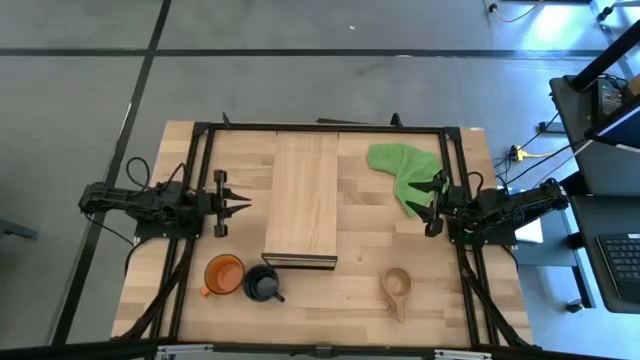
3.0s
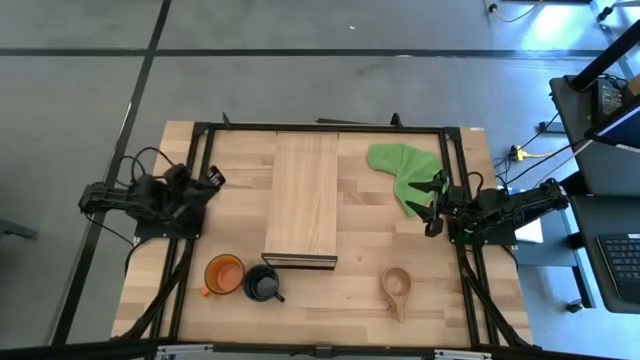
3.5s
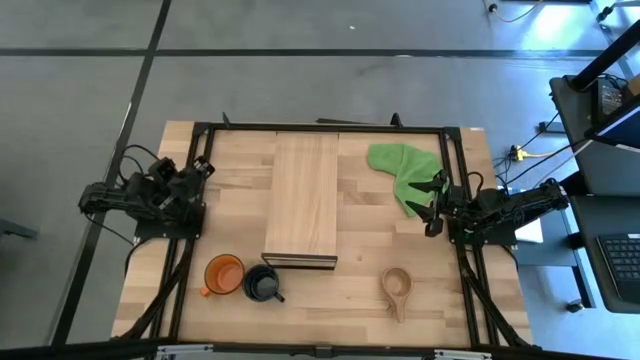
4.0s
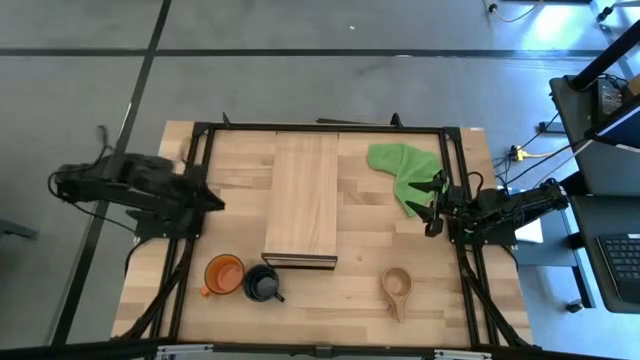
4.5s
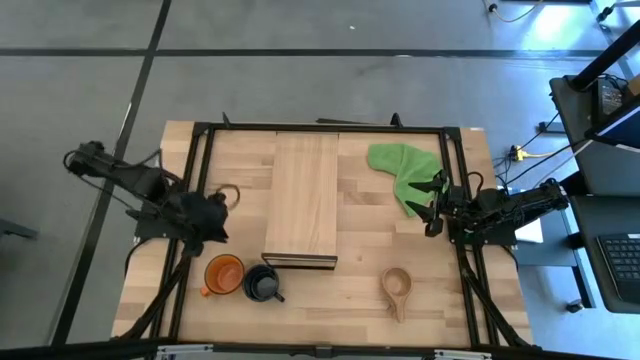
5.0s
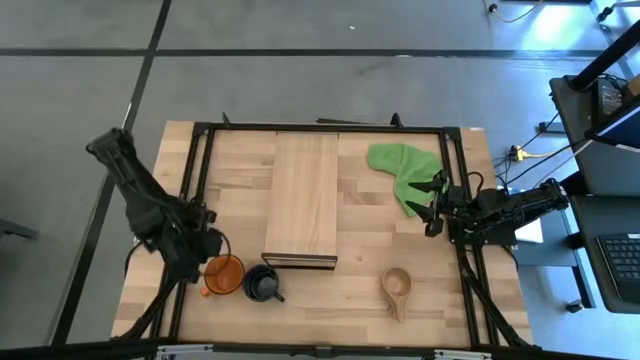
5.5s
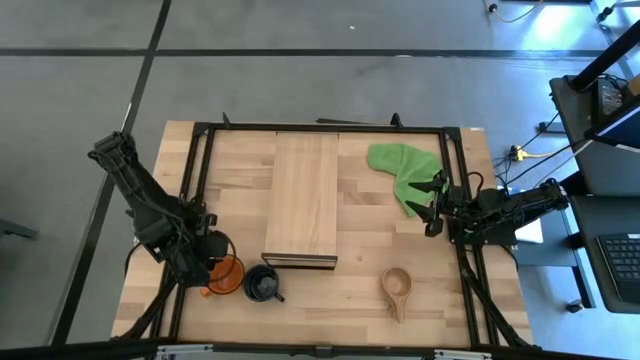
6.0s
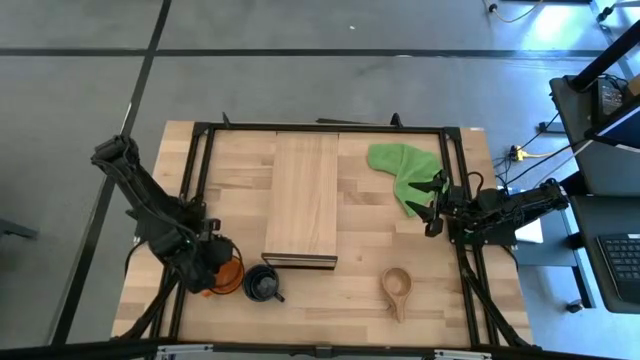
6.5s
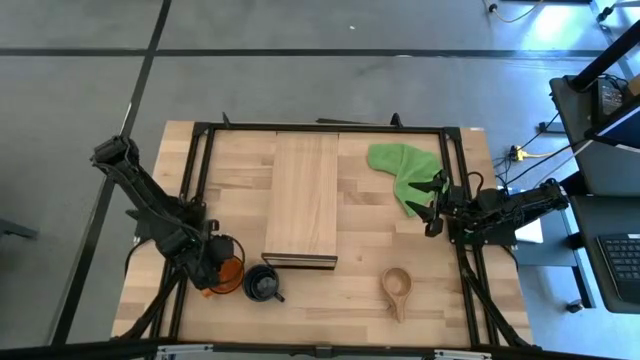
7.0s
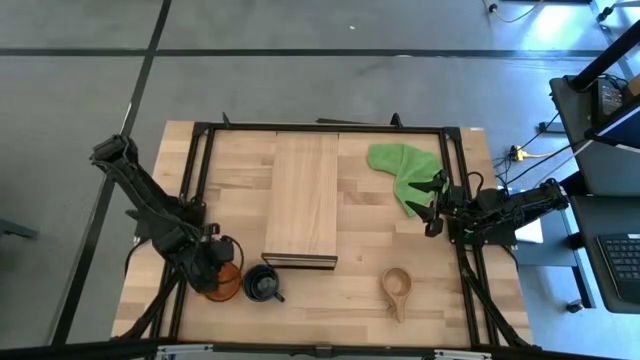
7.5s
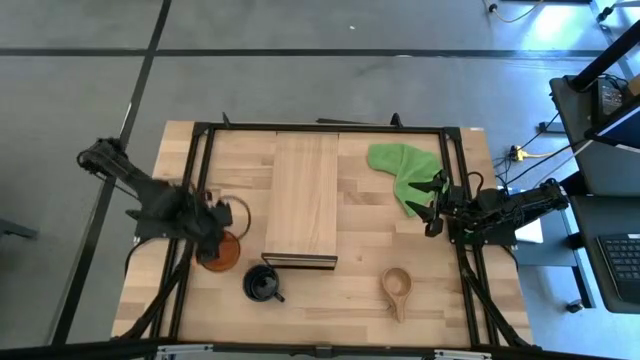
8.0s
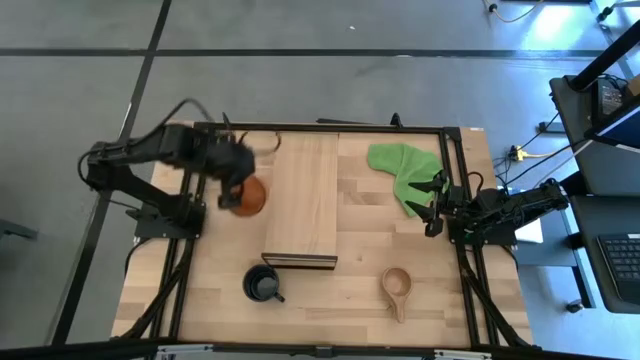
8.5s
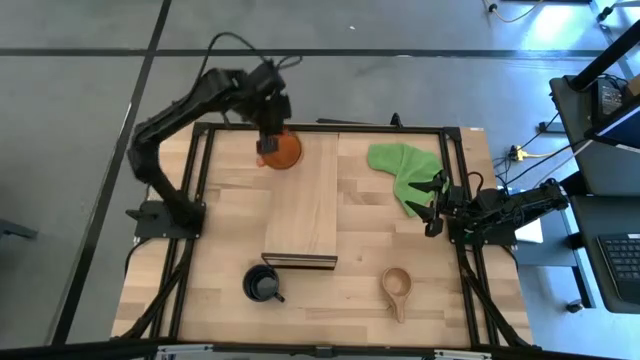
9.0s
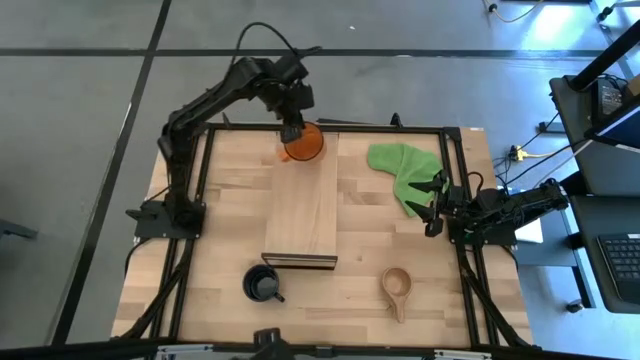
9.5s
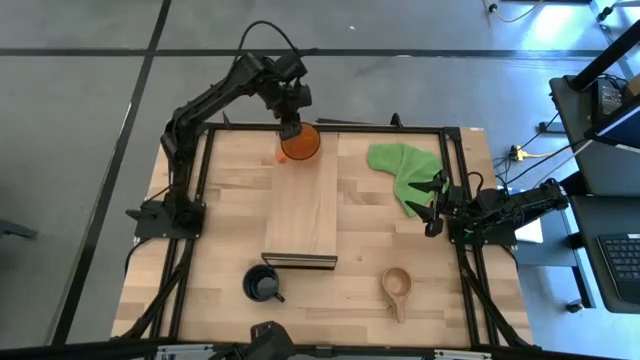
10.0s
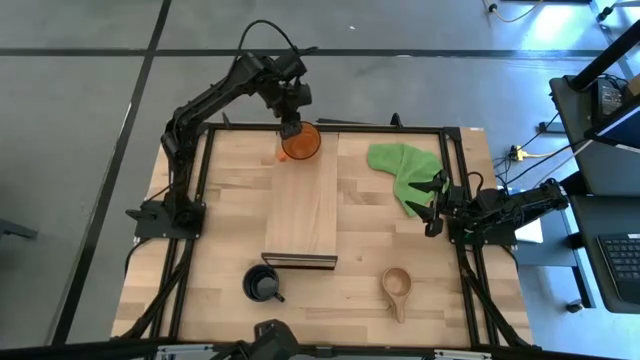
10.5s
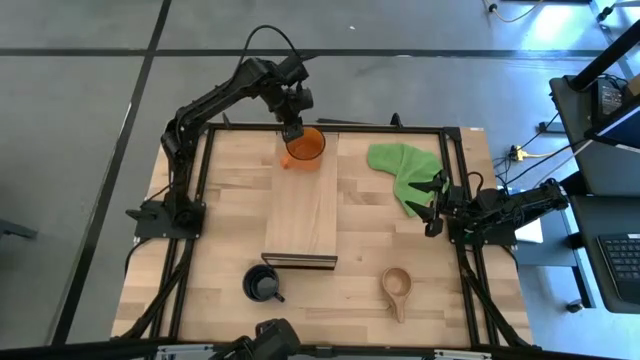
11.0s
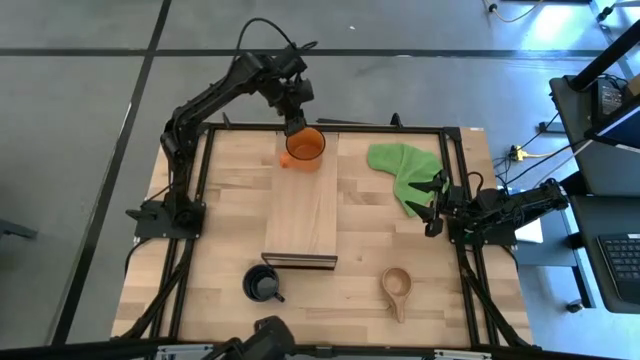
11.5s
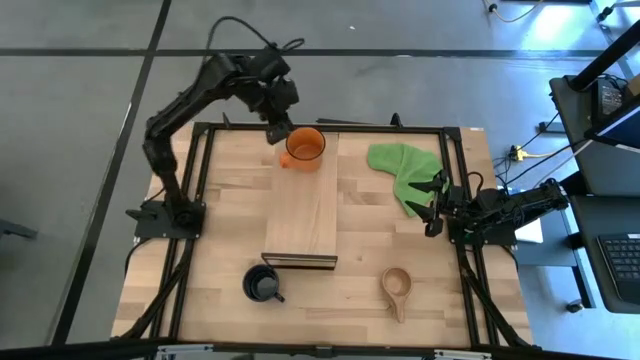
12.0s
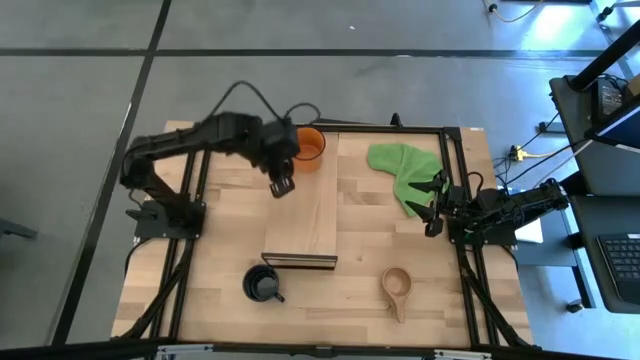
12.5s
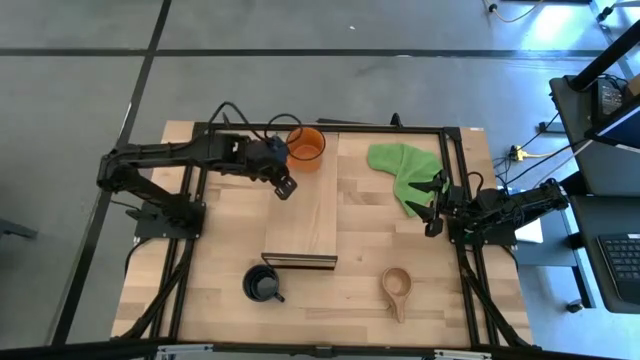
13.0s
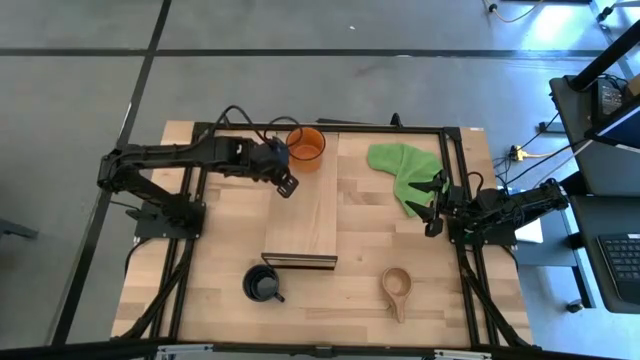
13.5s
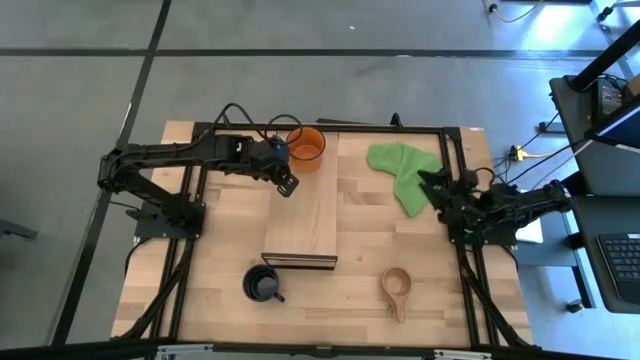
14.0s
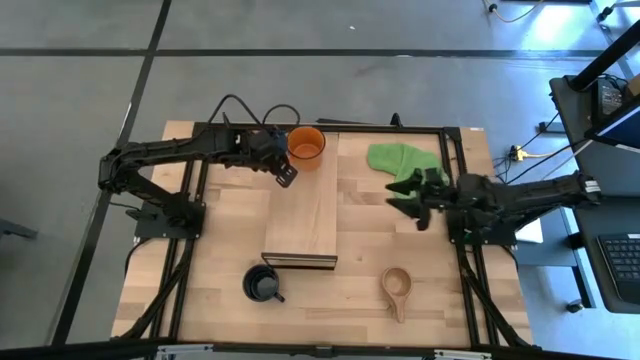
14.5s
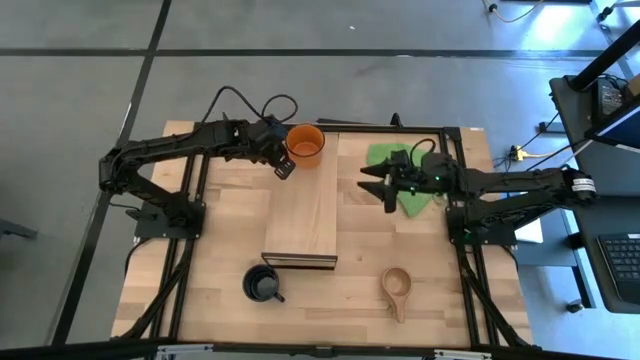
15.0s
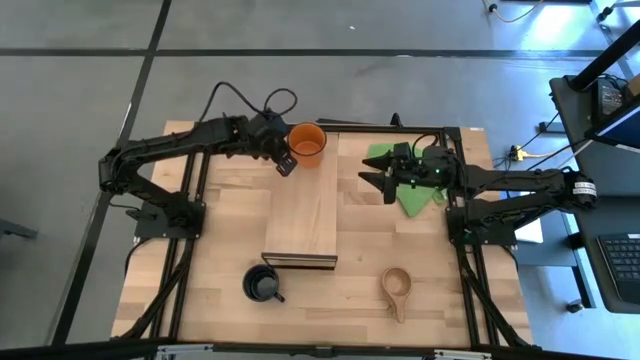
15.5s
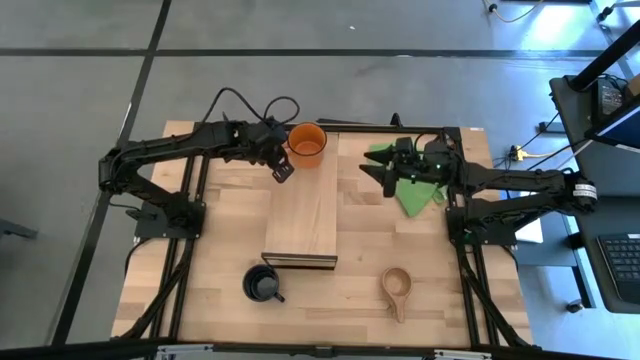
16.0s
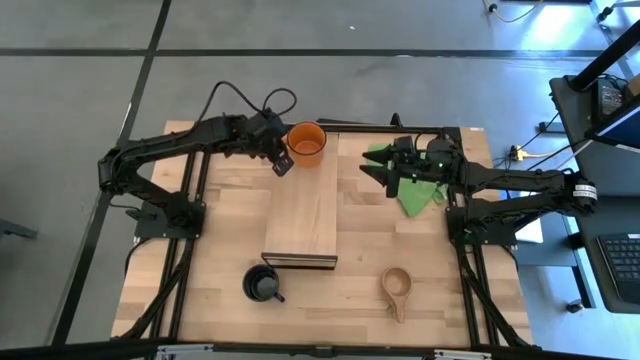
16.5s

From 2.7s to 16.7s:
Task: Stack small to large cups/mugs on shelf
Put the orange mug on the shelf

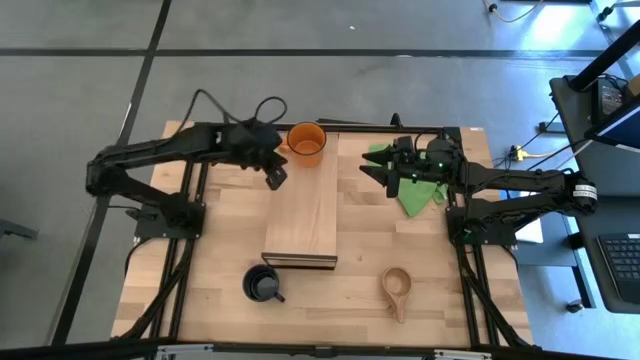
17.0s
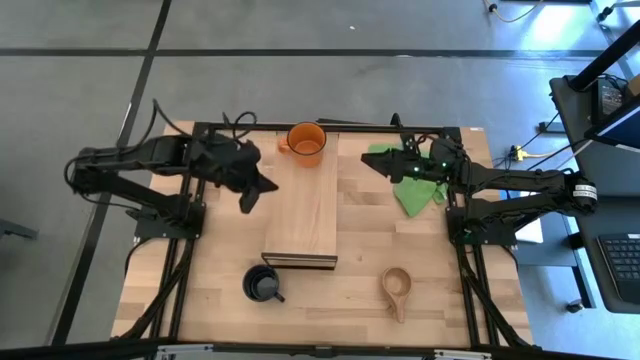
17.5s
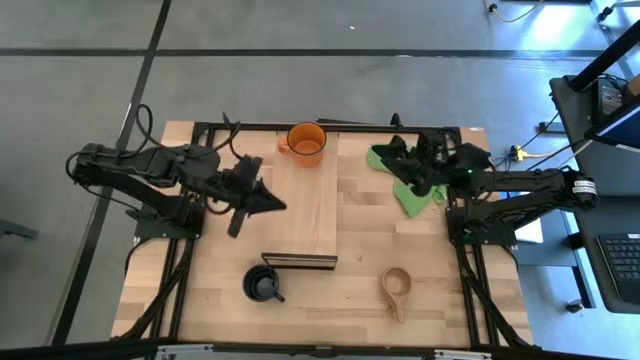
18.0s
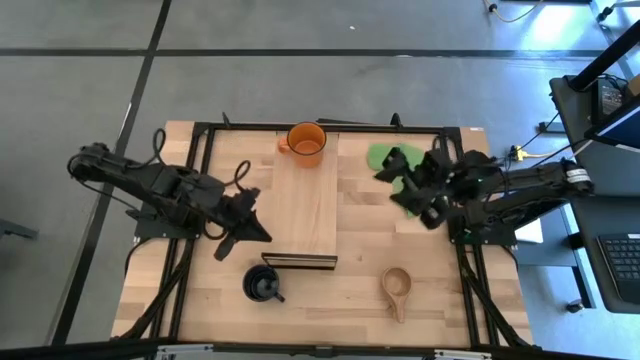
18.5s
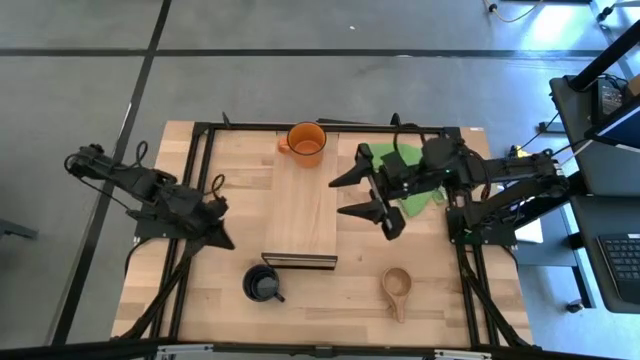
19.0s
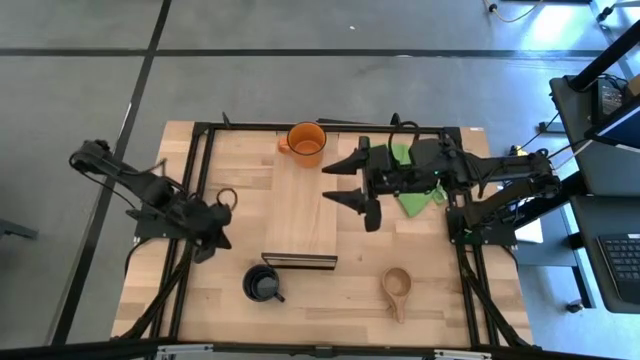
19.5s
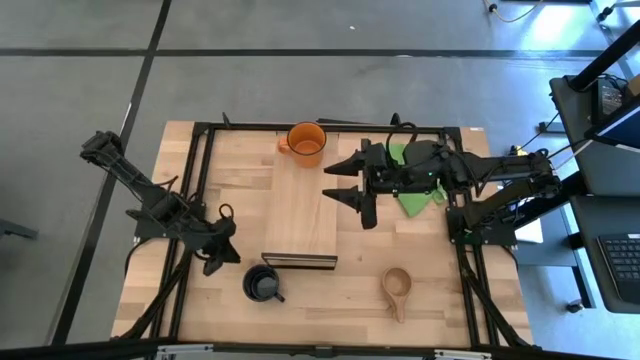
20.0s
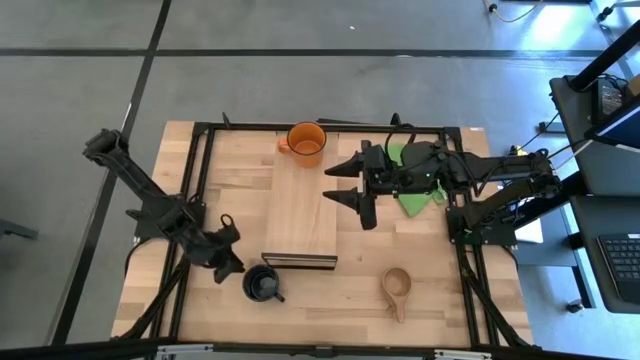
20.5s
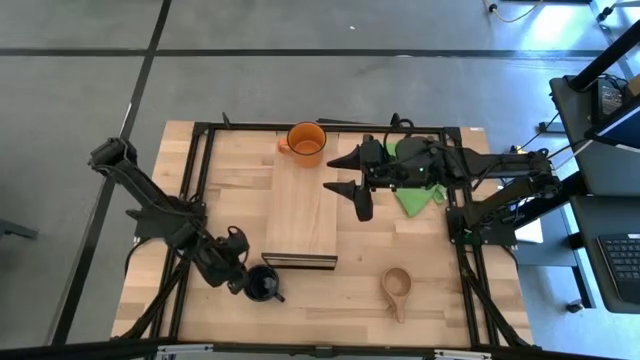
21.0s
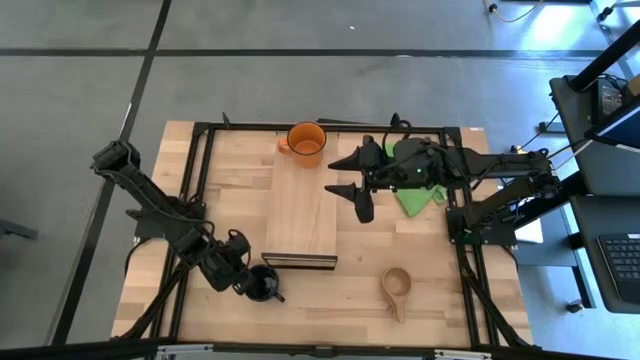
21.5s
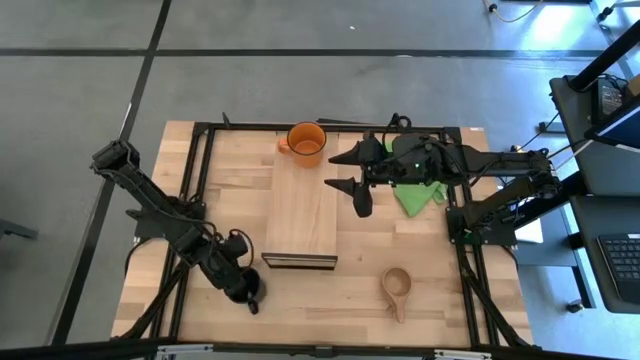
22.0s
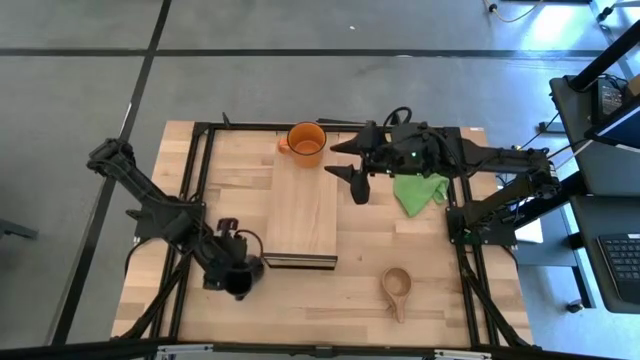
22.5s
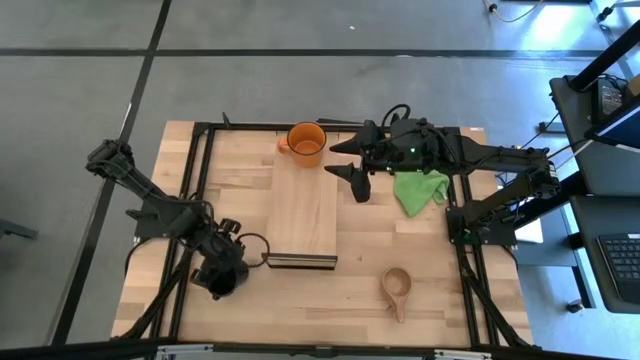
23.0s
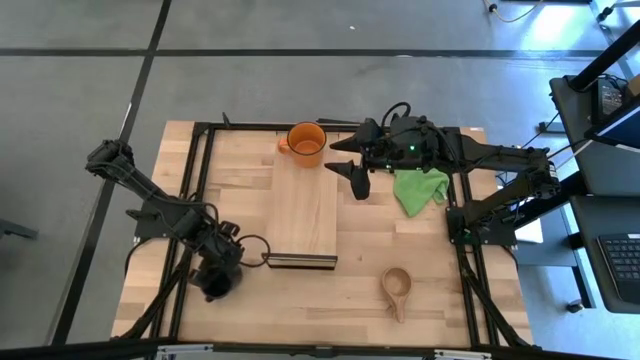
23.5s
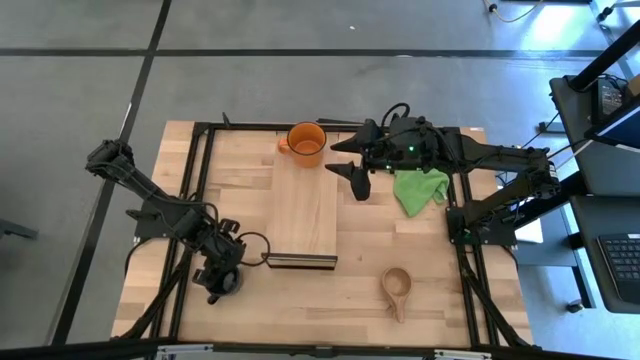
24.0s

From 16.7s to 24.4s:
Put the blue mug on the shelf
